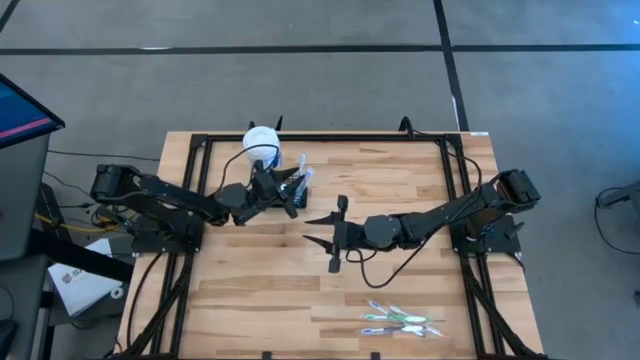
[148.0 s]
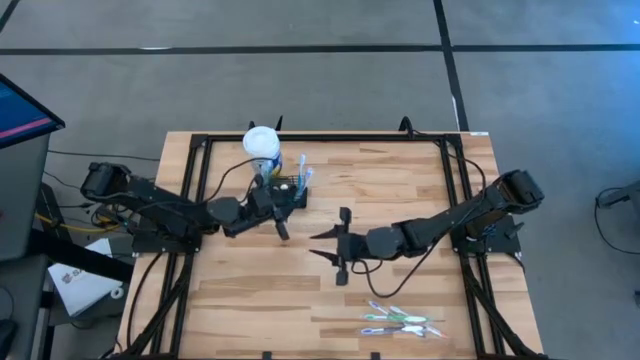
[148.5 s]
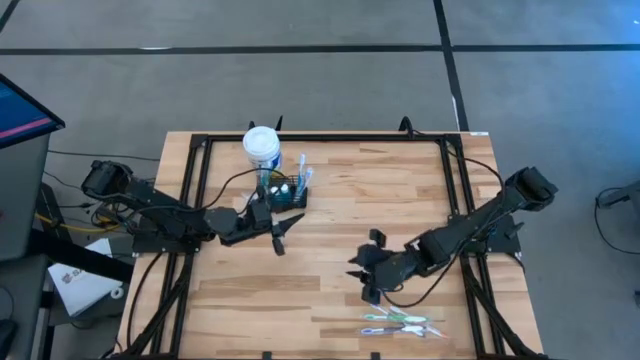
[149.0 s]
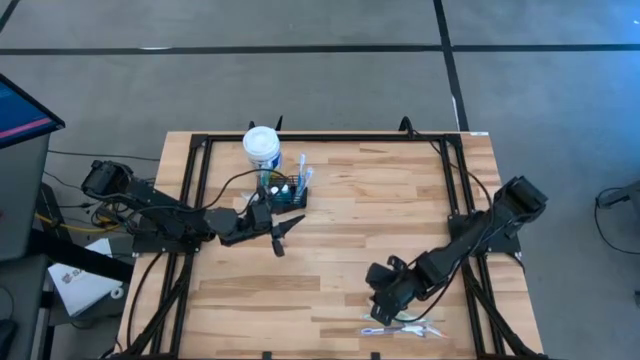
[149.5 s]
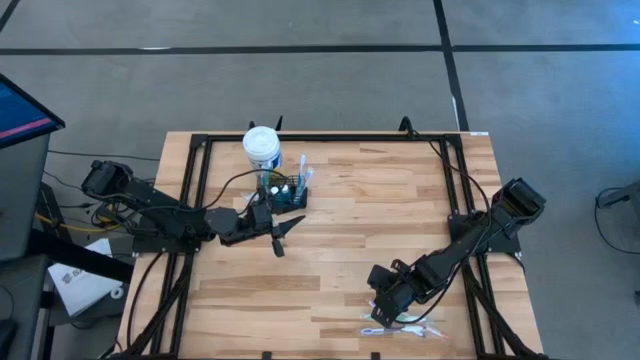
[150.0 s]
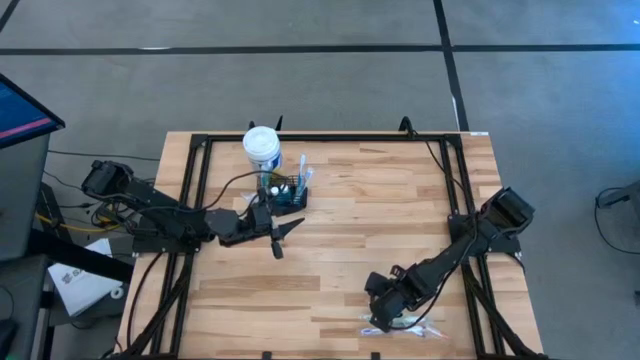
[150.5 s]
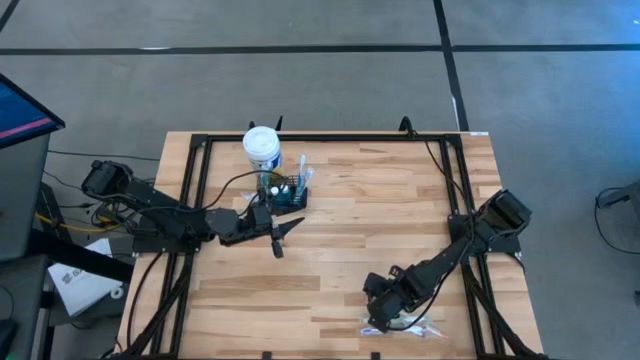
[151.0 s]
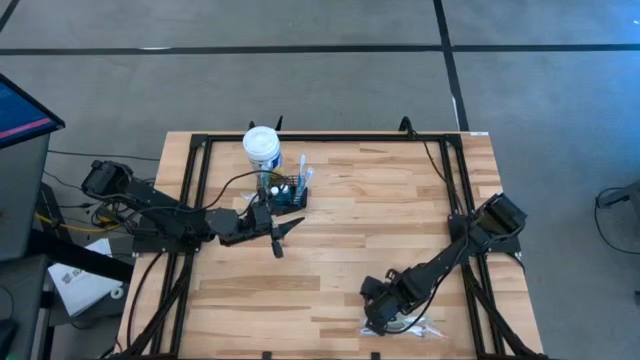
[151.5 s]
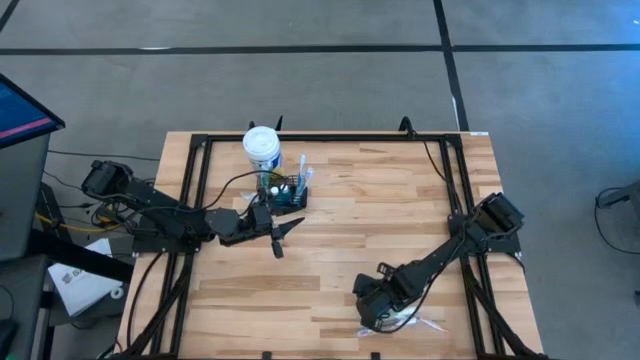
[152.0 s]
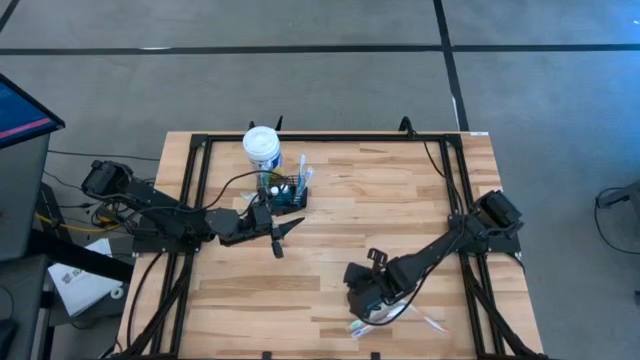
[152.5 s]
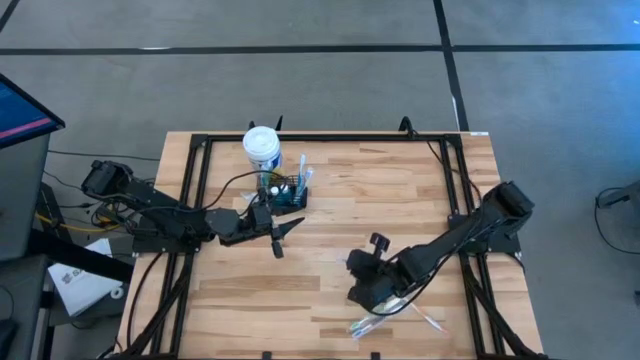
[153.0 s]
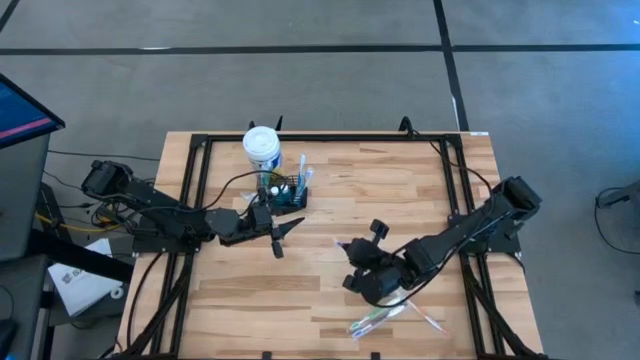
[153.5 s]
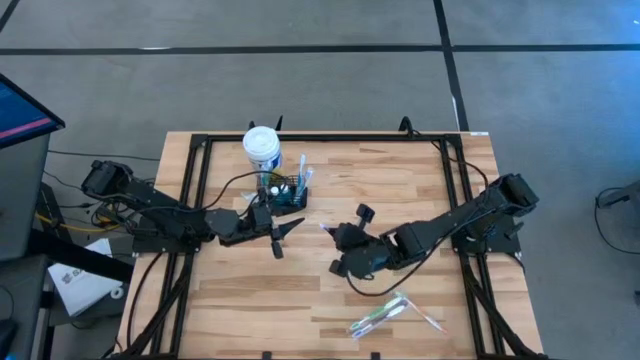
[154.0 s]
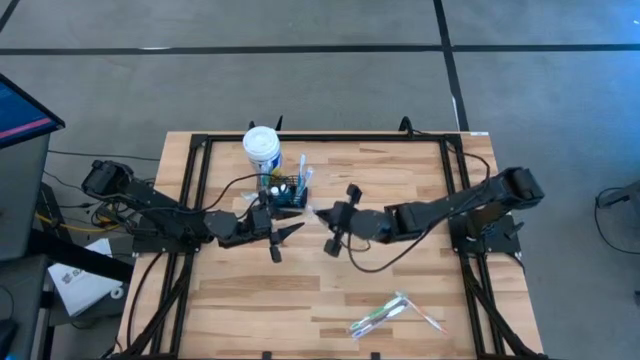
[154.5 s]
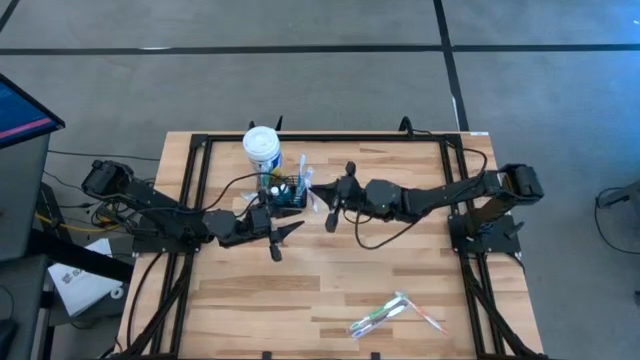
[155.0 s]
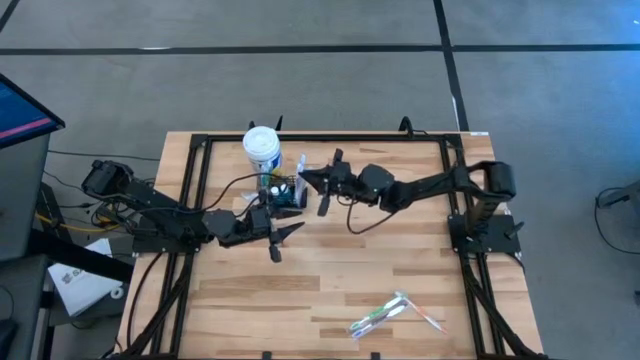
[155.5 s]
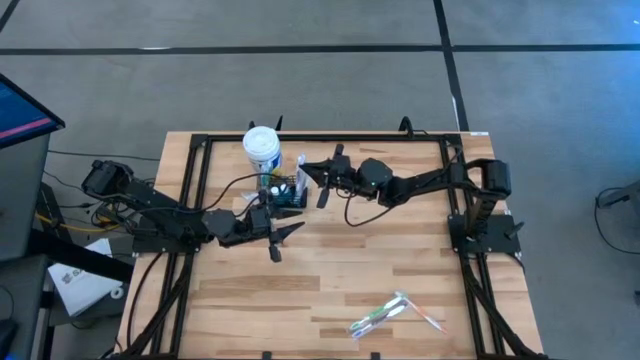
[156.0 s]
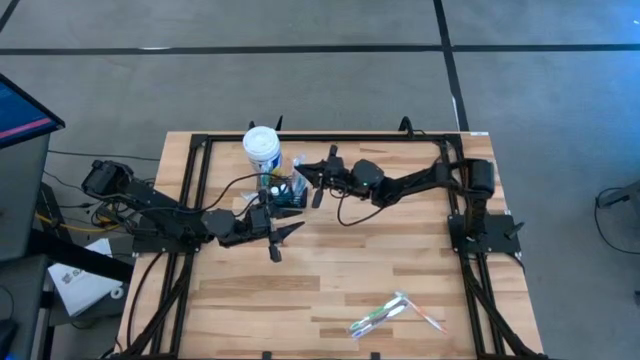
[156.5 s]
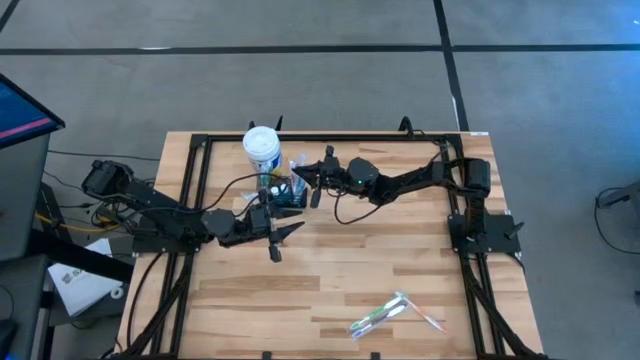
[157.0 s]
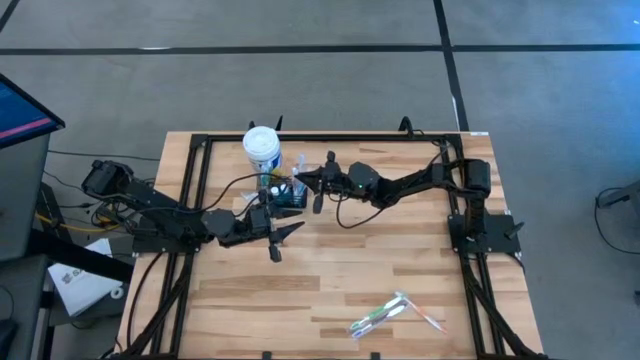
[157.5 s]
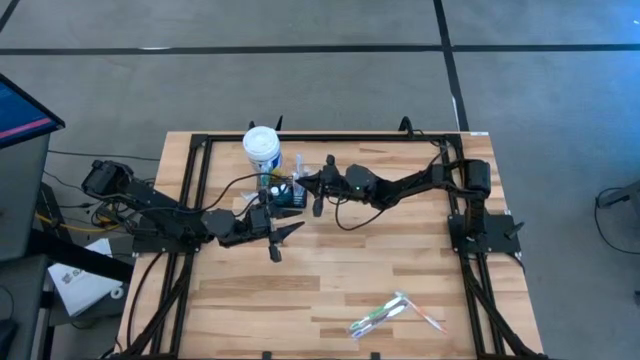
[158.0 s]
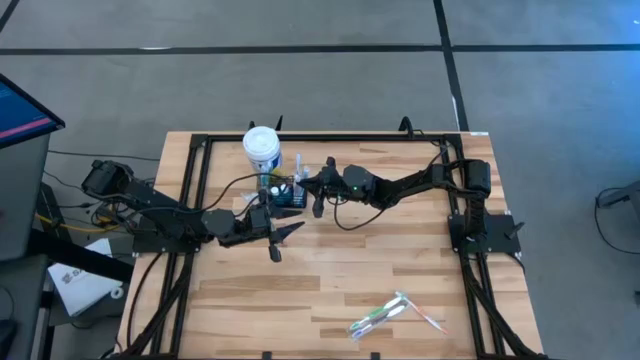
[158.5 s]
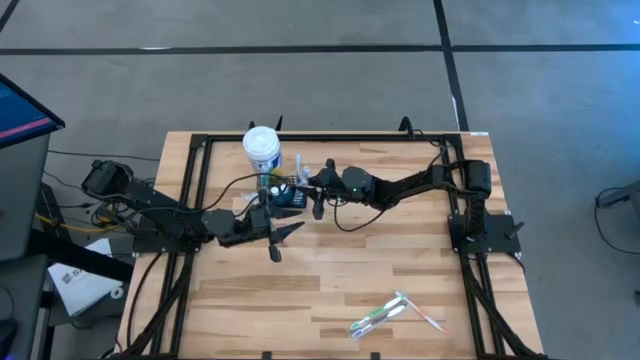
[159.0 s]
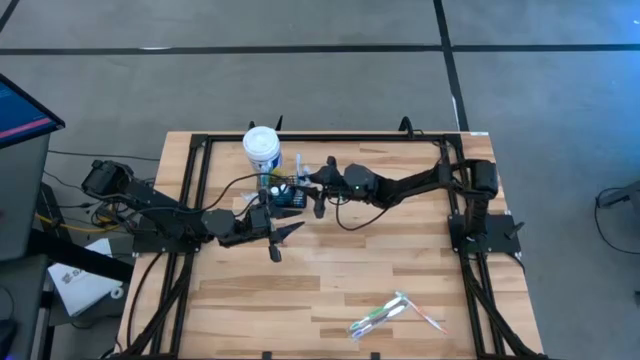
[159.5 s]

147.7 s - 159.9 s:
Task: Pick & Place toothbrushing station
Put the purple toothbrush into the wire organizer

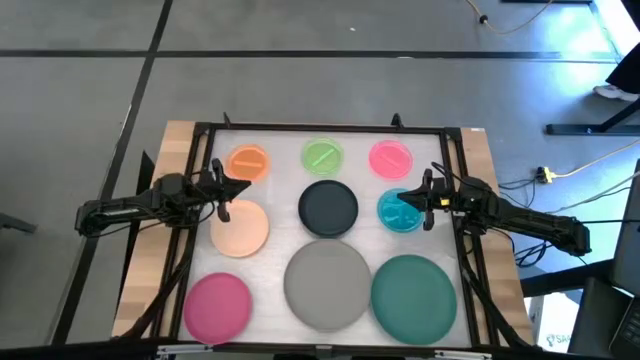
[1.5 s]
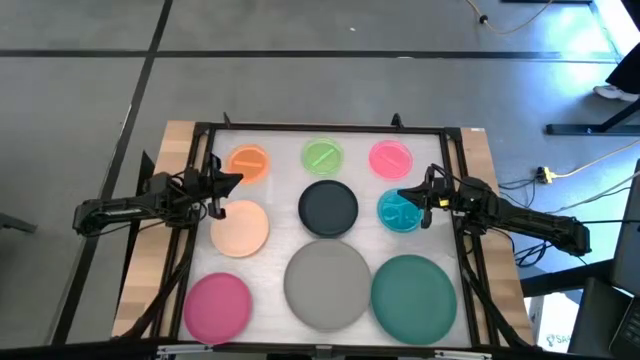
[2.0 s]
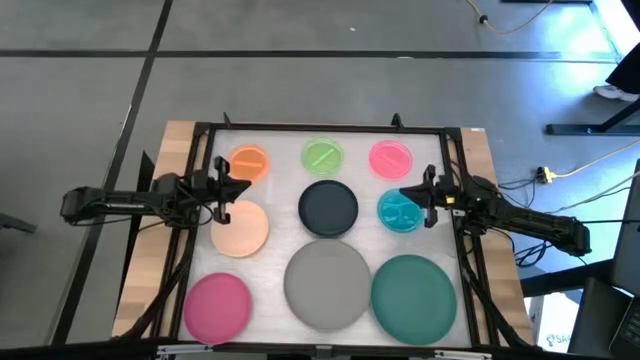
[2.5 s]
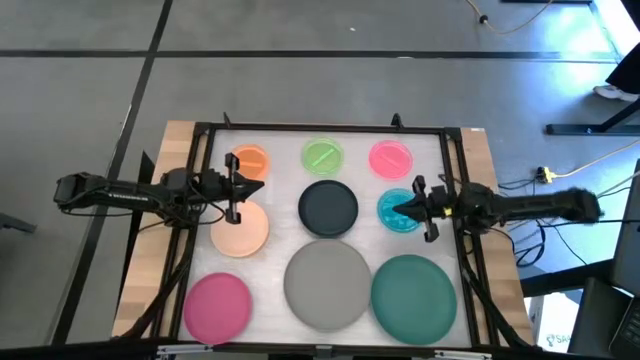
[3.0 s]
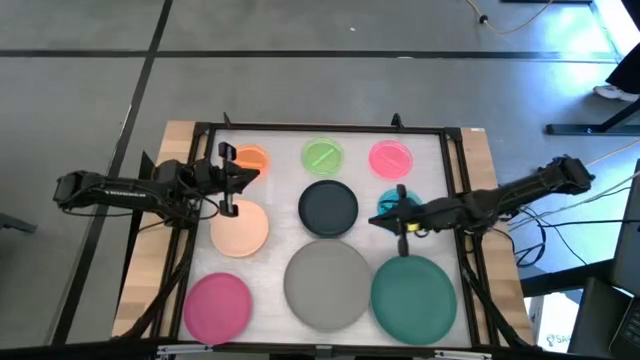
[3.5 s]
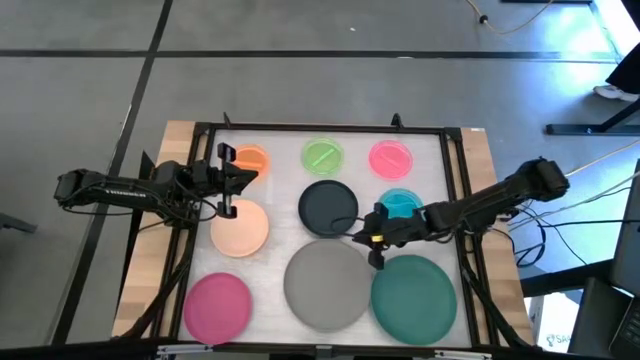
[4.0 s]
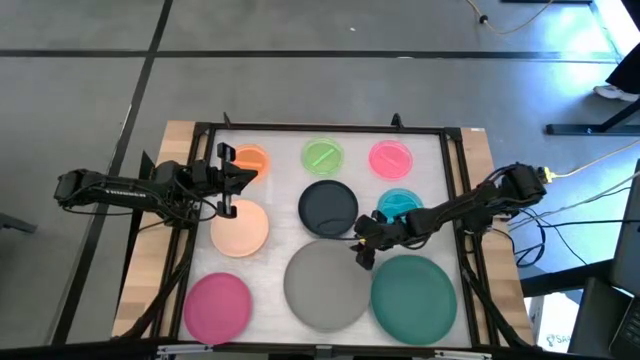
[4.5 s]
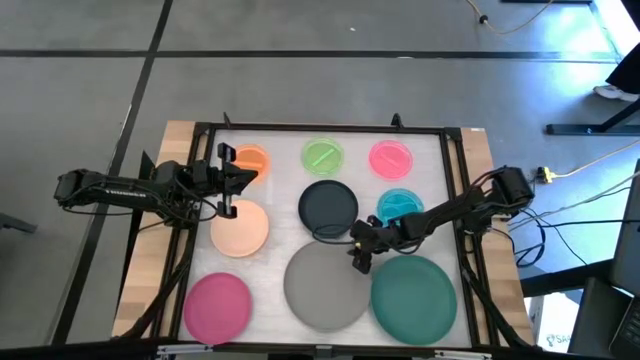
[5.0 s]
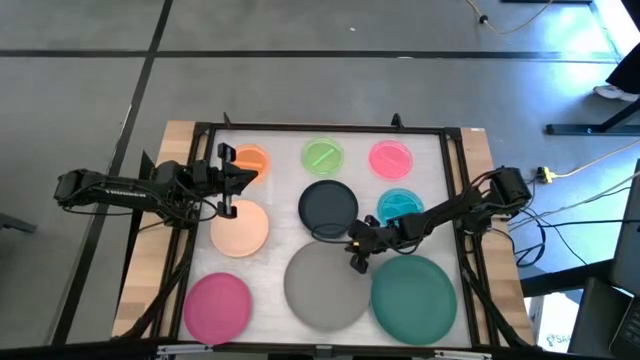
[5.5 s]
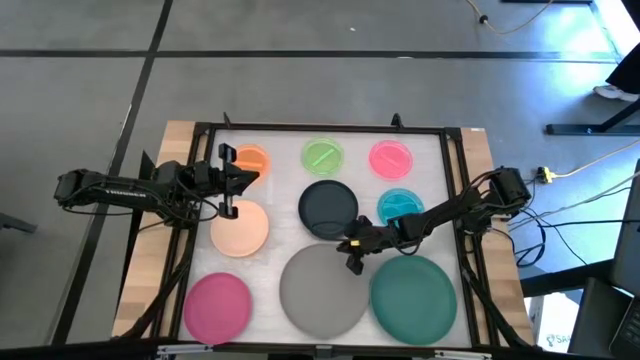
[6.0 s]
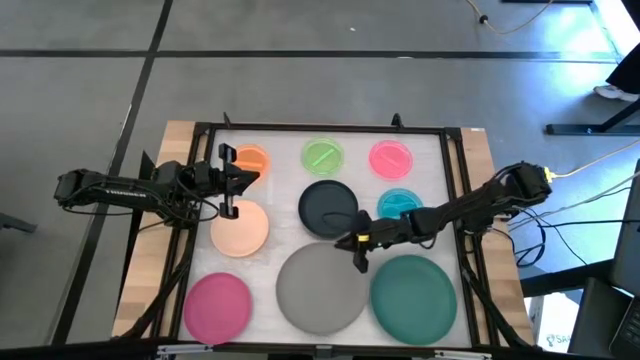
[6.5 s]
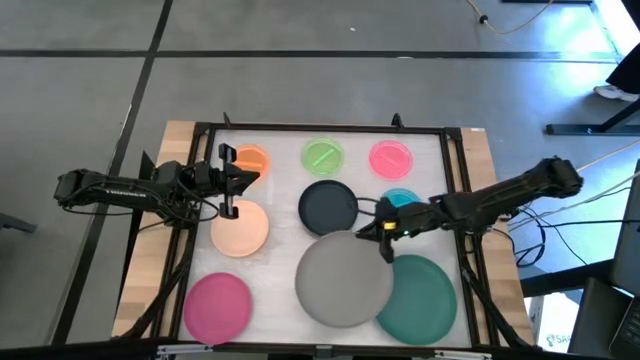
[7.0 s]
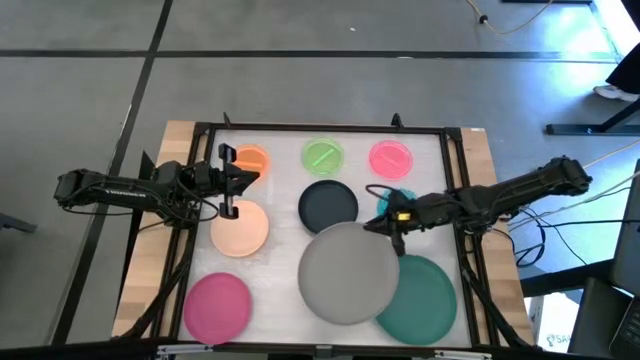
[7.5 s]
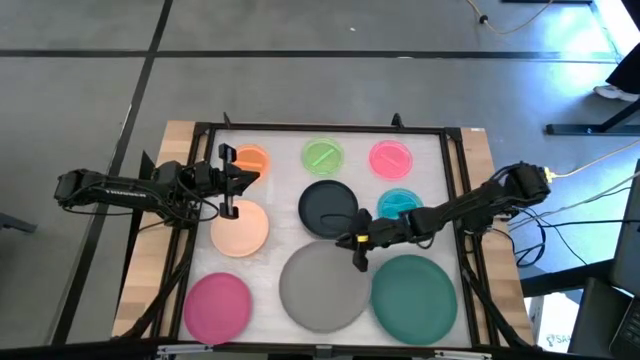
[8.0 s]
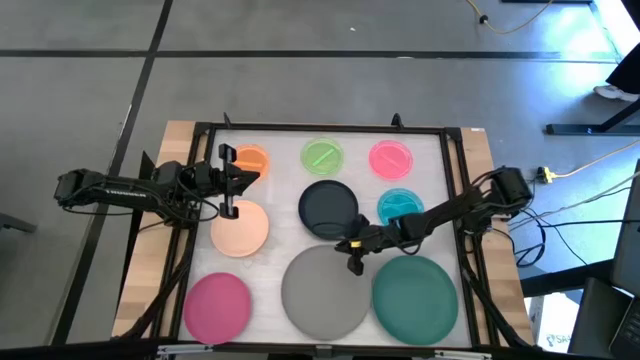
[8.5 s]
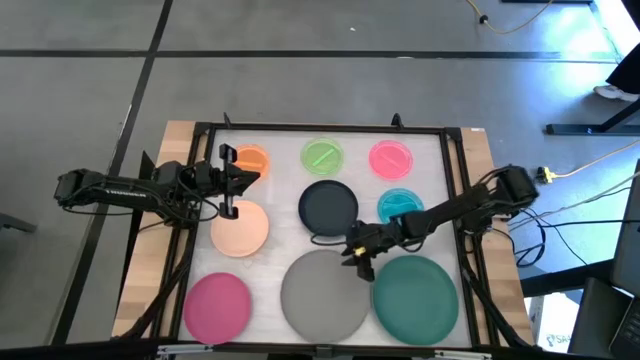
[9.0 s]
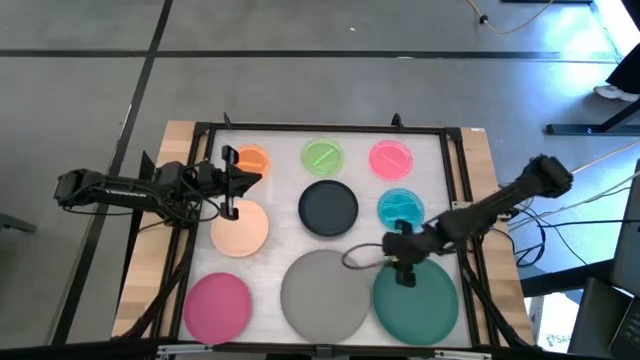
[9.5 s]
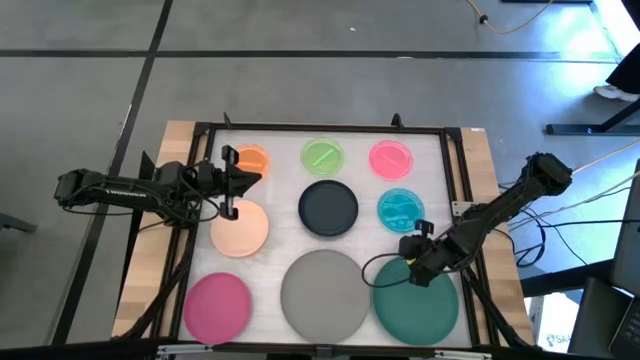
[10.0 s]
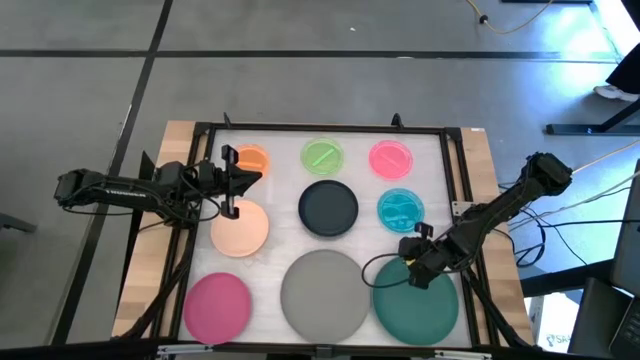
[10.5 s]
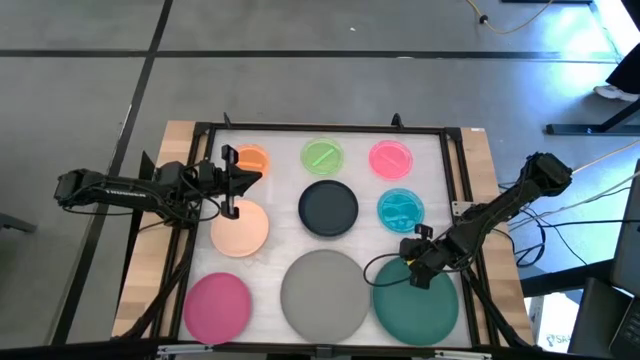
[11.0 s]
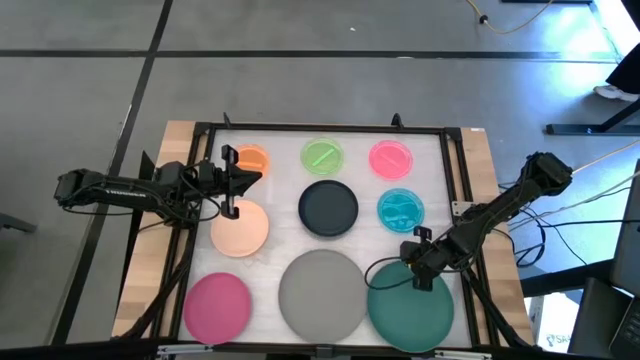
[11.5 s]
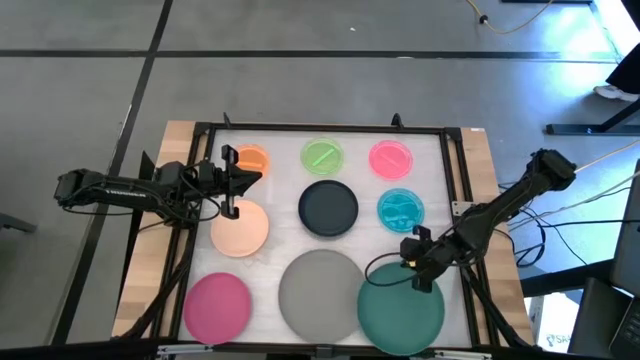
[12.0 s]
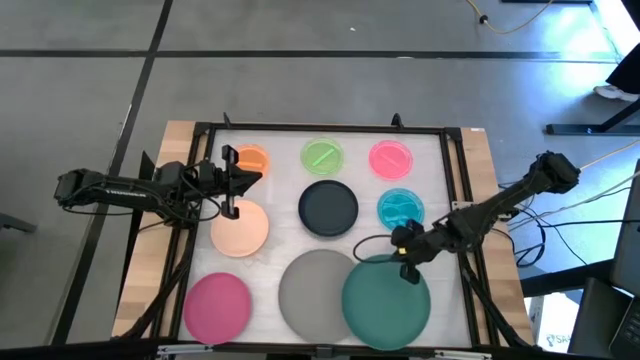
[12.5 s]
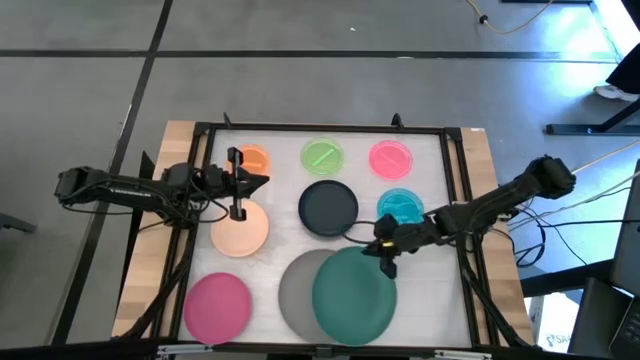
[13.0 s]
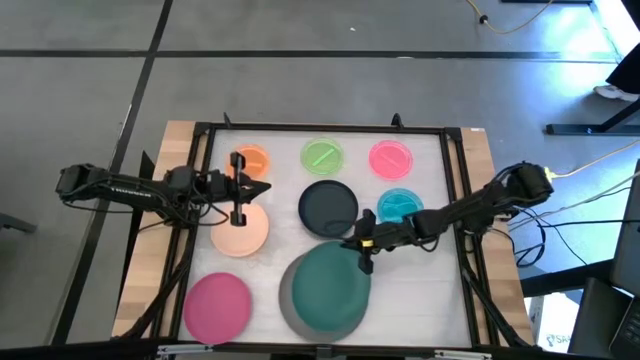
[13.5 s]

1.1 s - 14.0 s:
Task: Stack plastic plates
Stack the green plate on top of the gray plate
